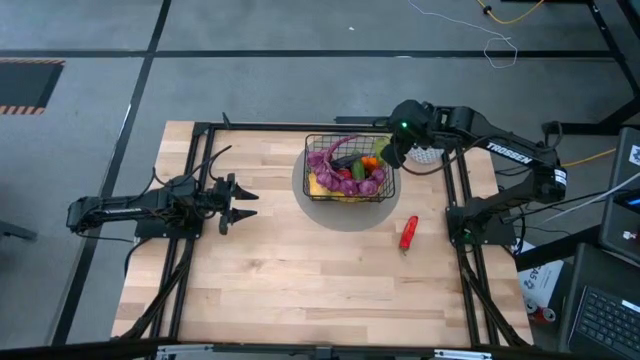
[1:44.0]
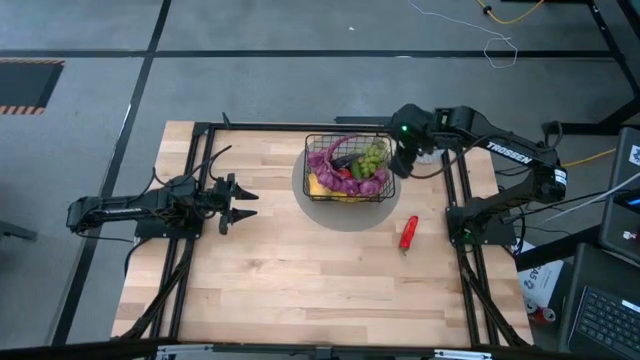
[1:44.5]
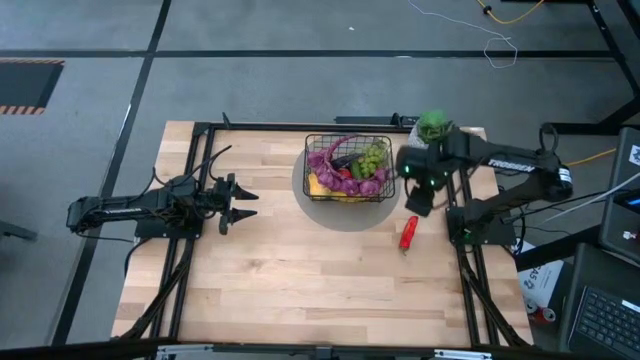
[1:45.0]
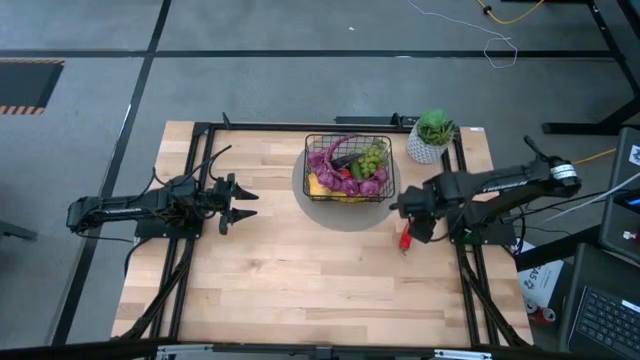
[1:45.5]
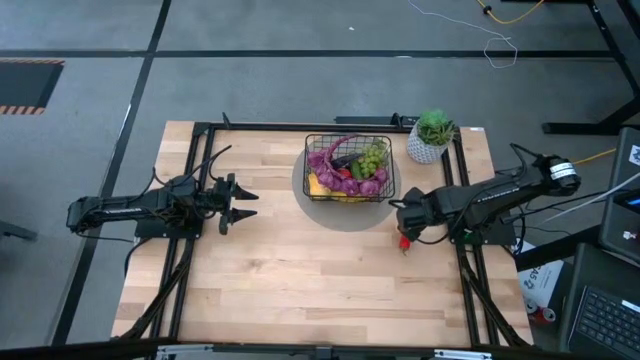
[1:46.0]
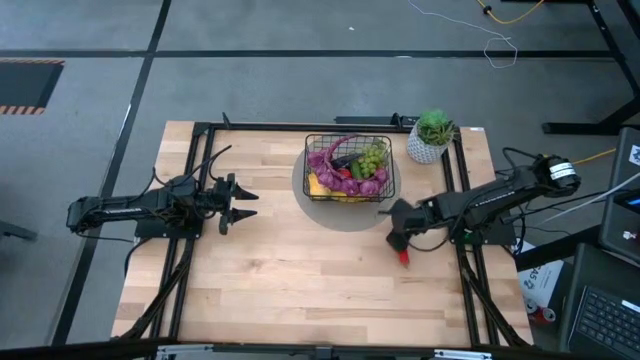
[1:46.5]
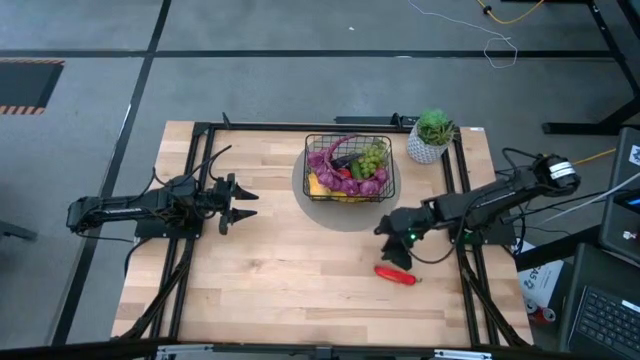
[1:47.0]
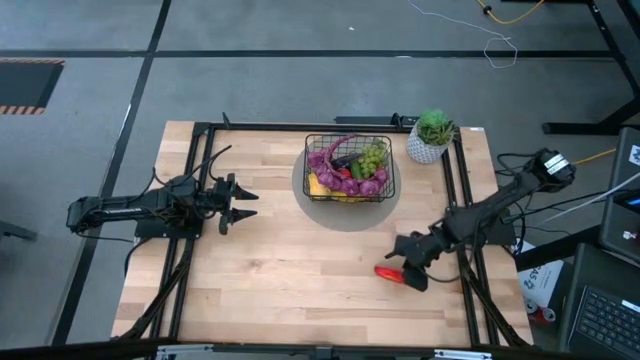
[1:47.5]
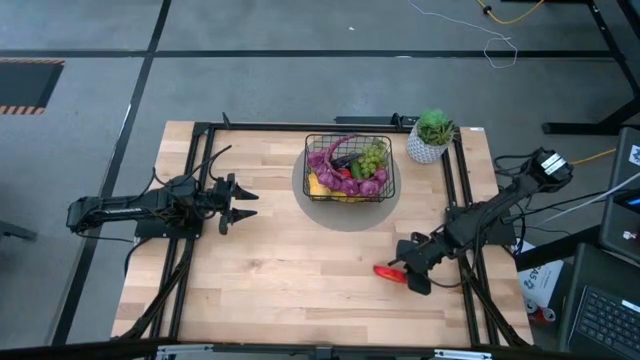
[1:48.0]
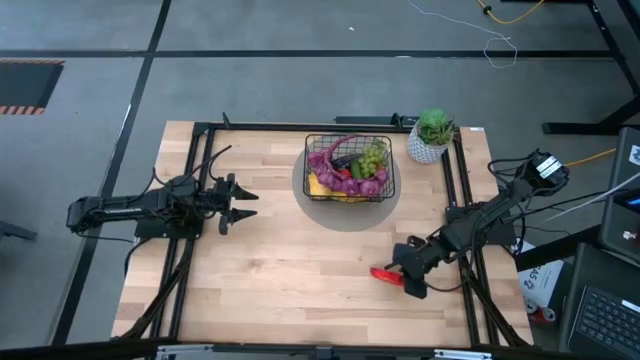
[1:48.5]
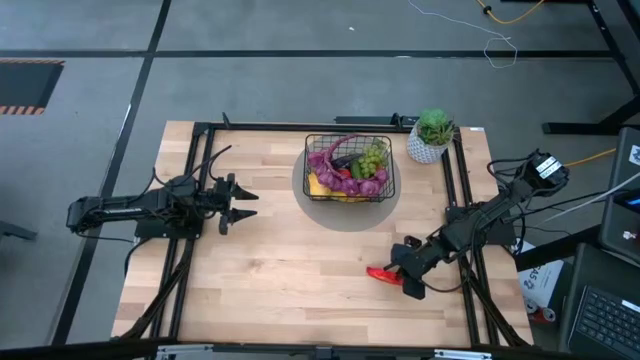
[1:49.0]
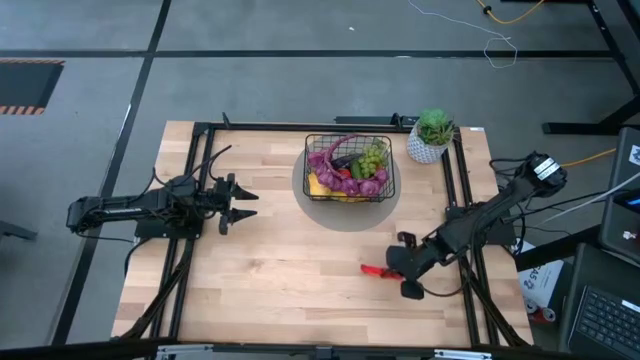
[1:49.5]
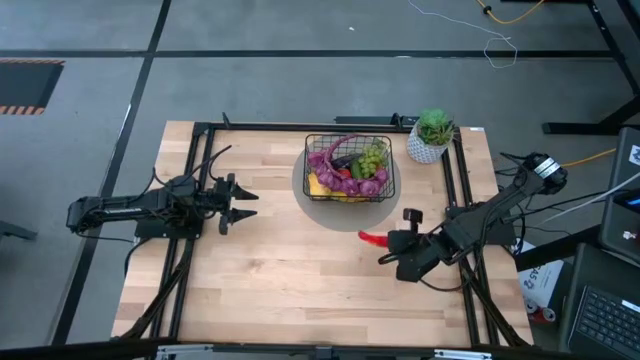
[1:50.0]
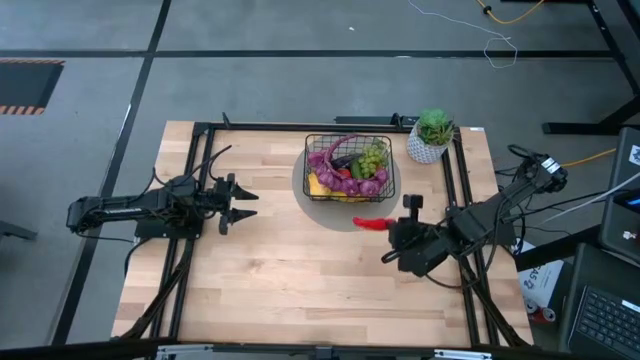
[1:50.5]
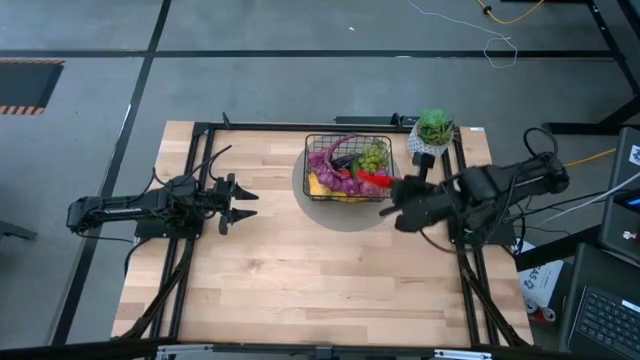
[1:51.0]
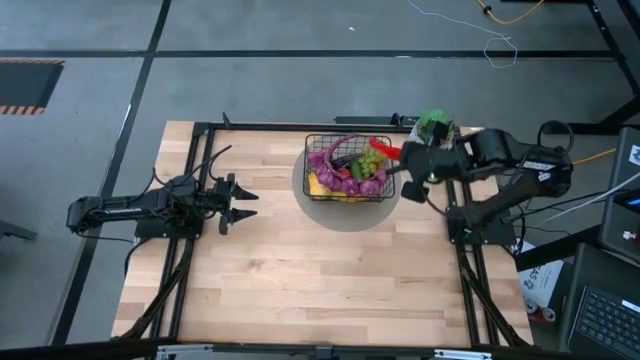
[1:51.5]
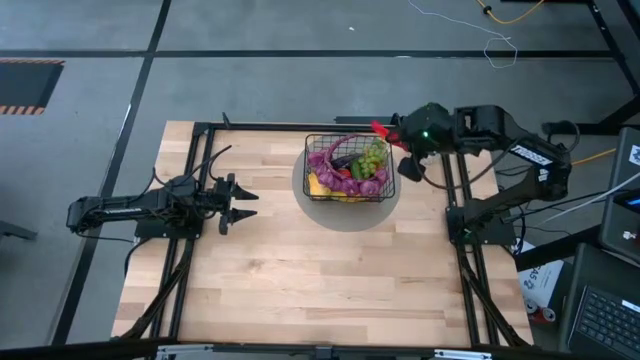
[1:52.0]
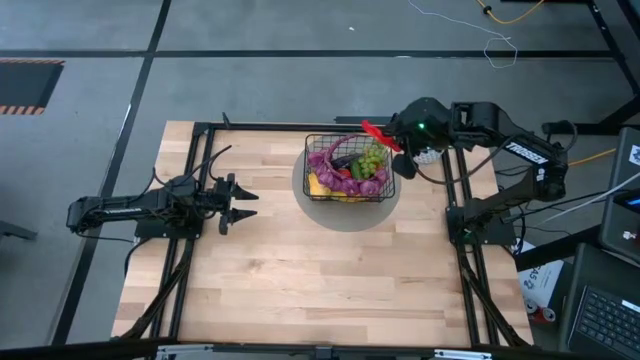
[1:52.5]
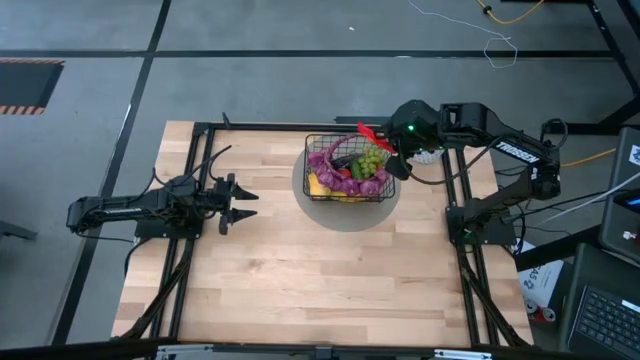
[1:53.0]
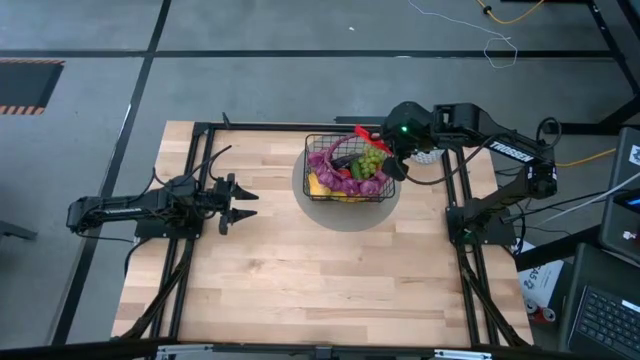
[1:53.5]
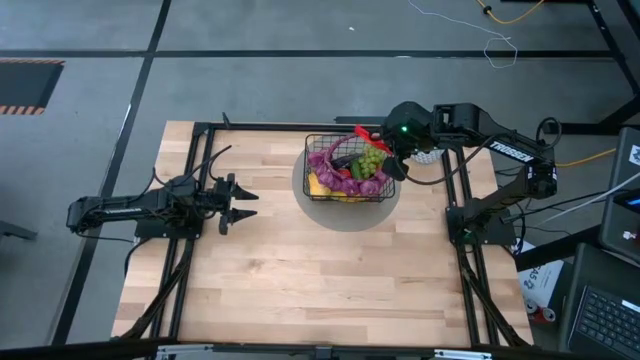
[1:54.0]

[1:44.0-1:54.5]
Task: Build produce basket
Put the red chili pepper into the black wire basket

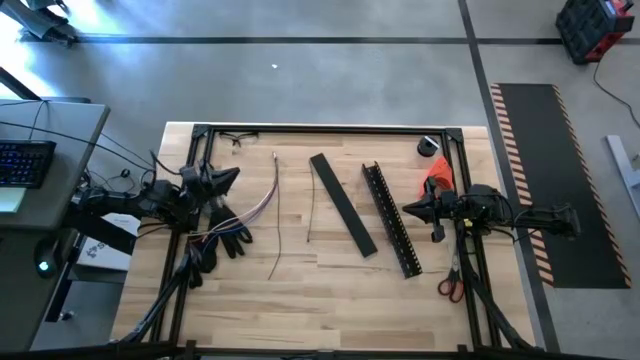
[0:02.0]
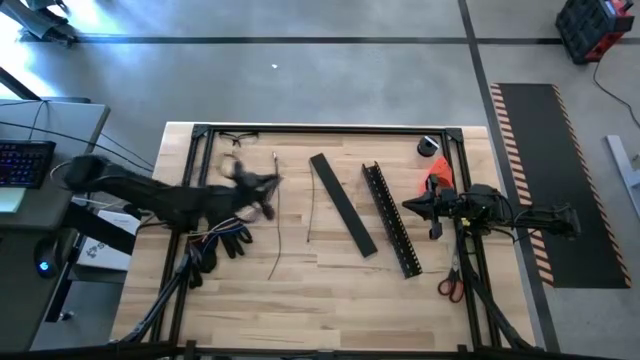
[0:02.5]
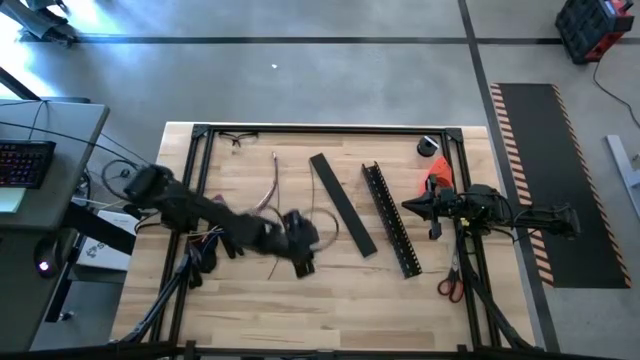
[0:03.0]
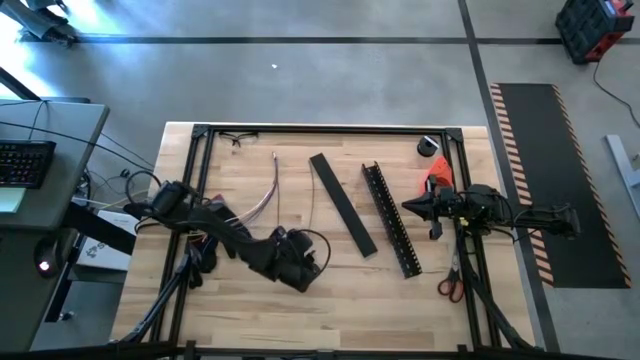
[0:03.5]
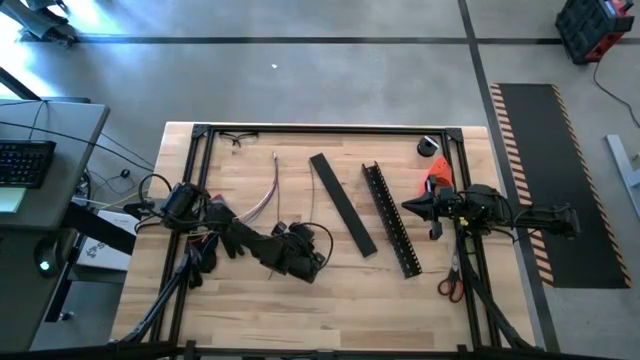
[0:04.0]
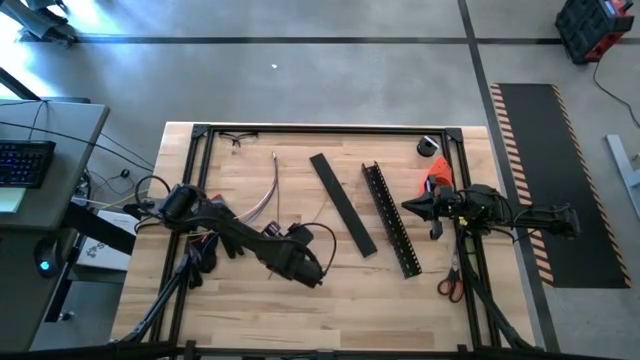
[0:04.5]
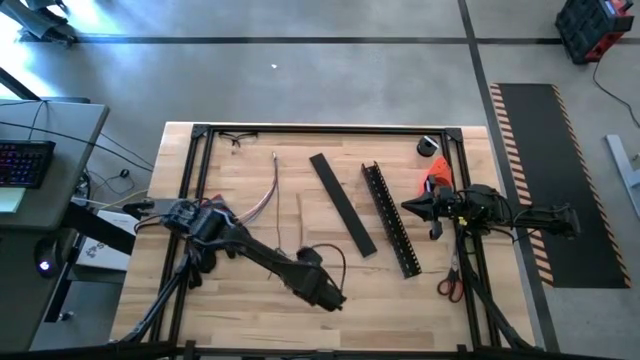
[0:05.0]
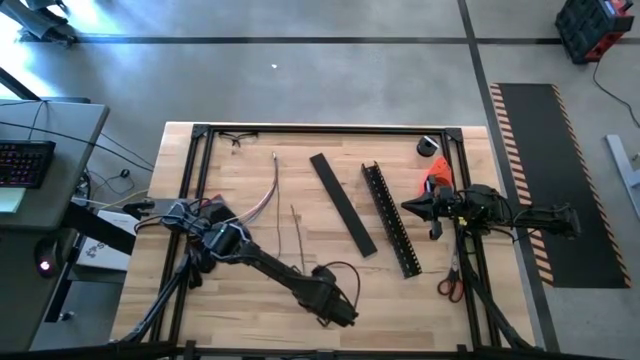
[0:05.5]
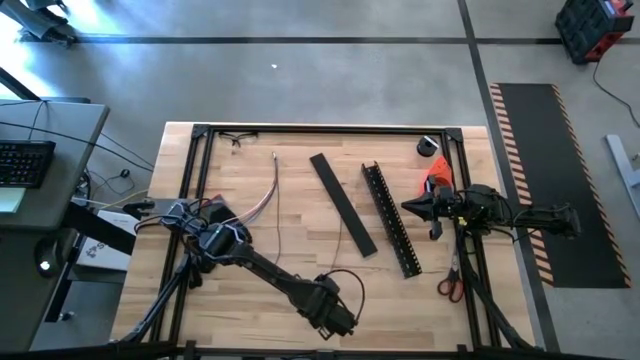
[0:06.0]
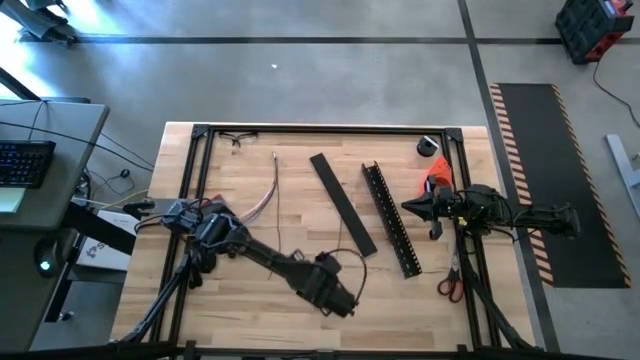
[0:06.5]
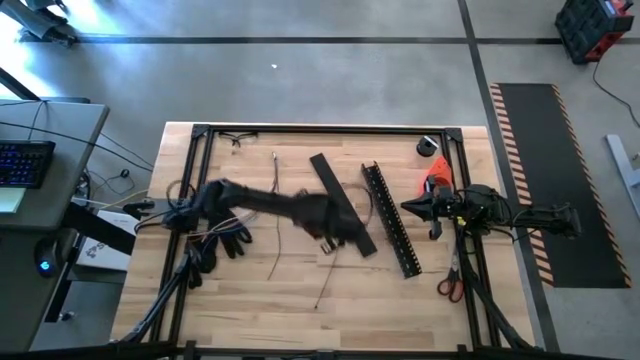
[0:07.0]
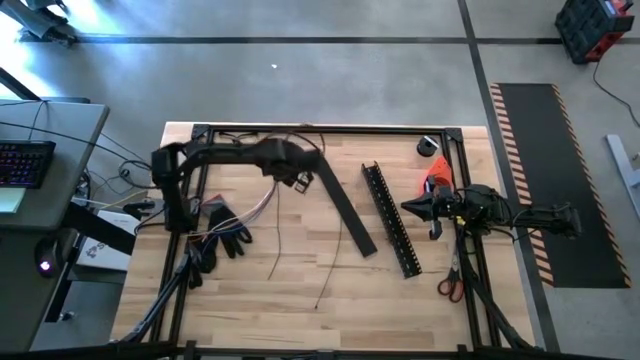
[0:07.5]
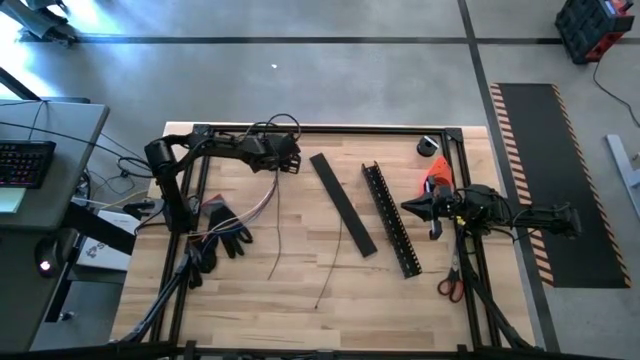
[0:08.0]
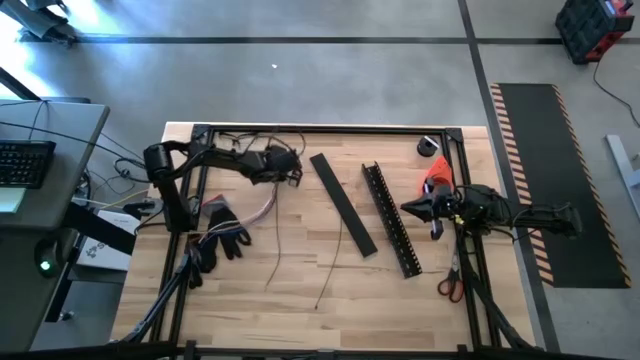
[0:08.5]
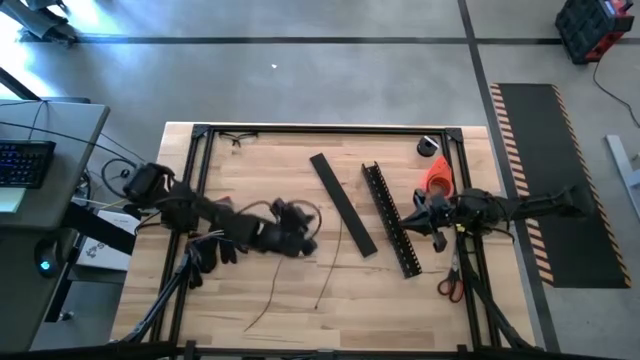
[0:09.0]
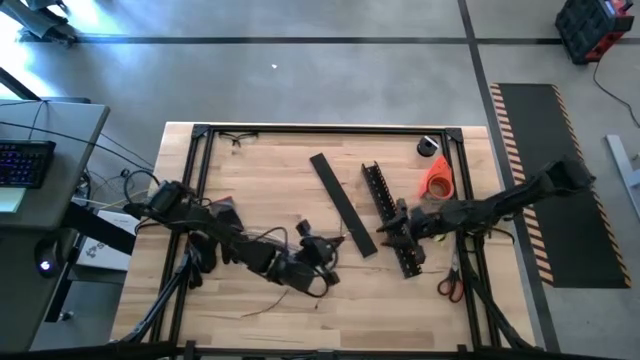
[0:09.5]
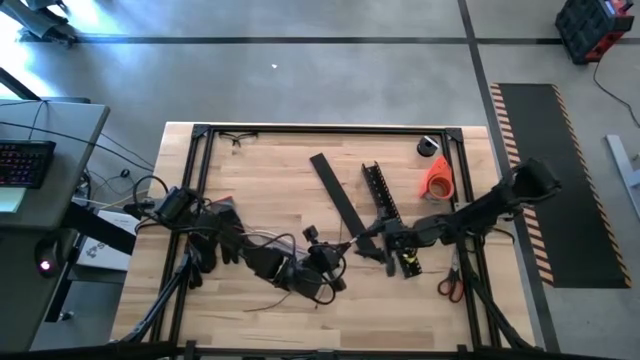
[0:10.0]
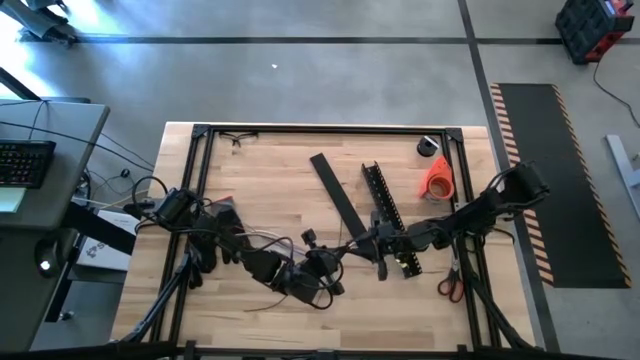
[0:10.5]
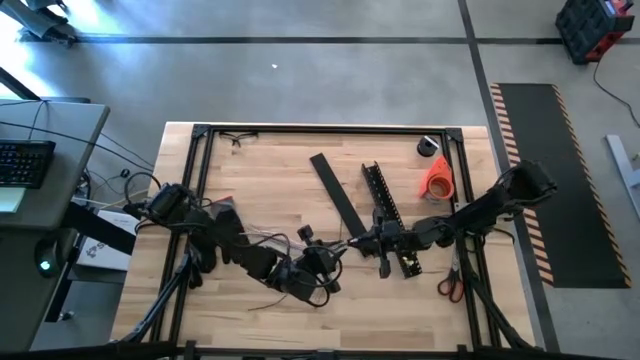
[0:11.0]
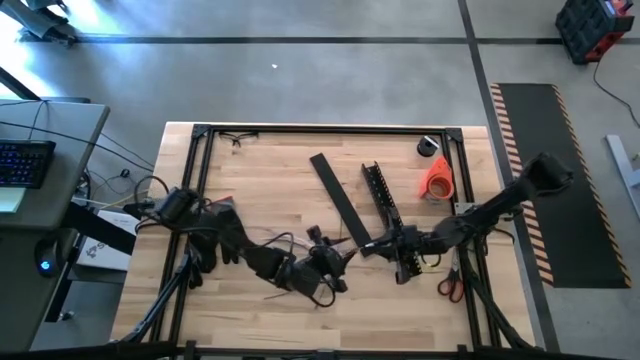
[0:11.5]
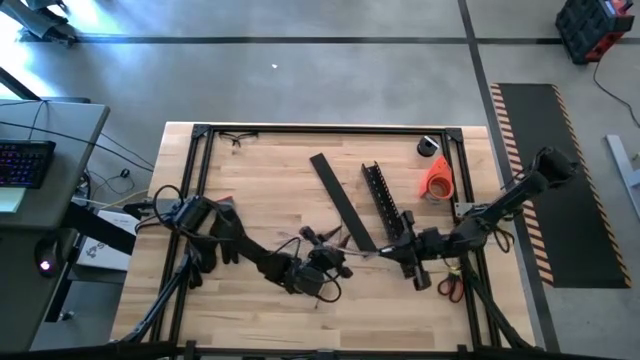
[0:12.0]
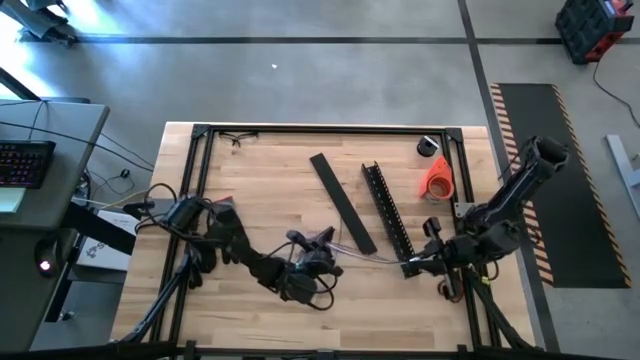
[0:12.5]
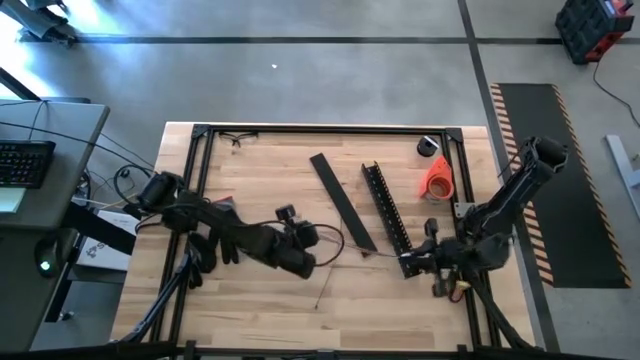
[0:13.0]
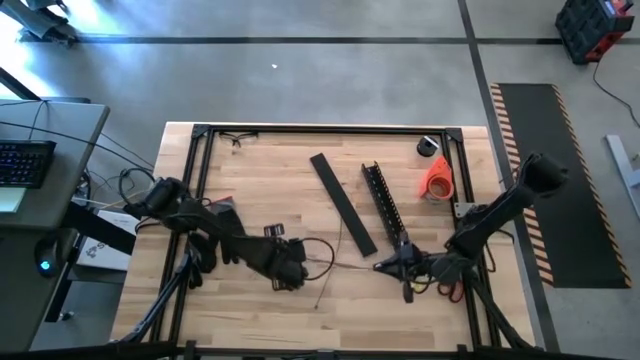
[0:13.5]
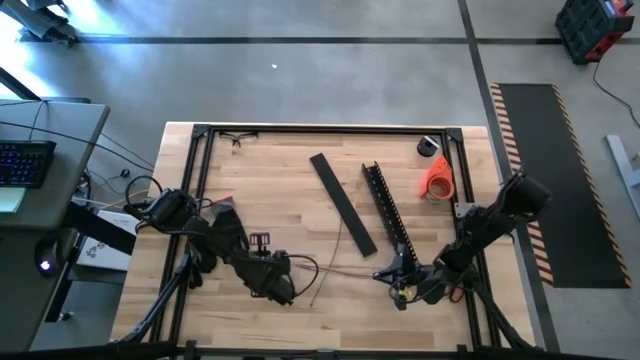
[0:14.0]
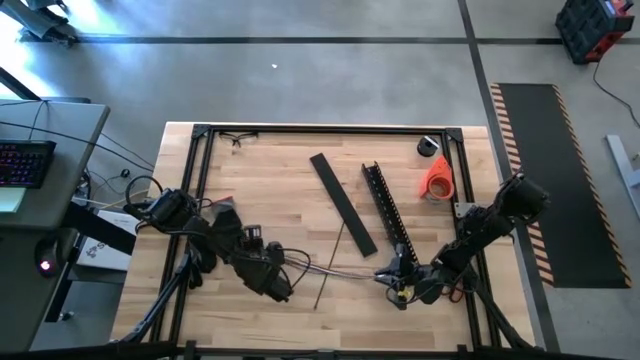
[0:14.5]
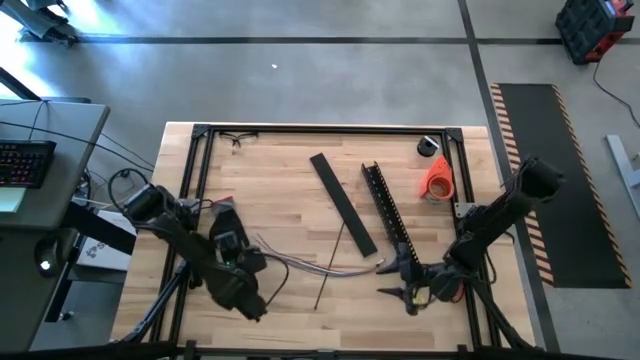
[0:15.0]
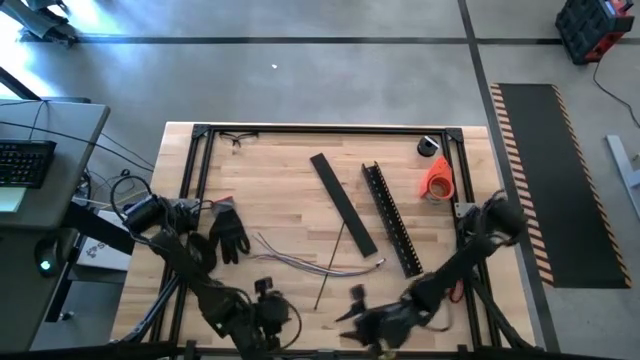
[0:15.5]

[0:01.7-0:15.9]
Task: Ziptie cables
Wrap the black zip tie on the cables
